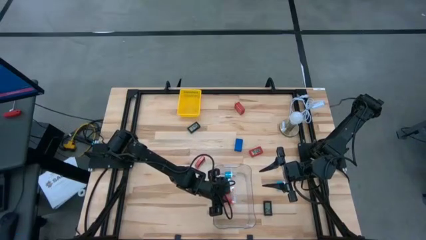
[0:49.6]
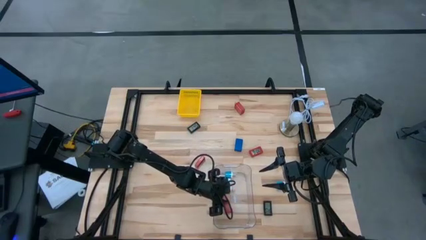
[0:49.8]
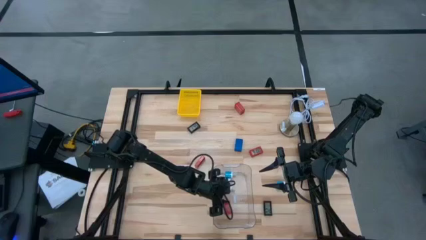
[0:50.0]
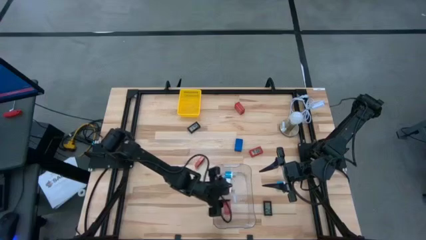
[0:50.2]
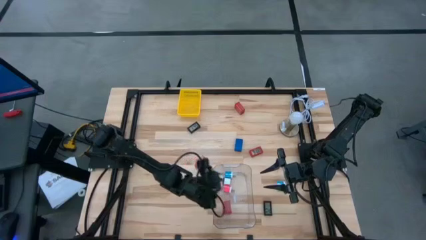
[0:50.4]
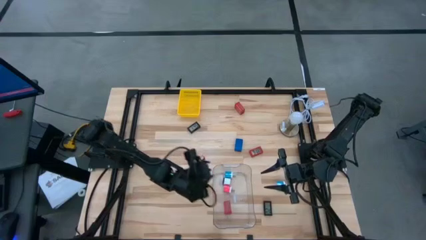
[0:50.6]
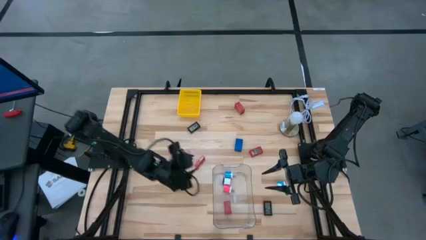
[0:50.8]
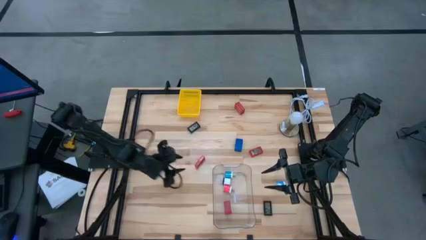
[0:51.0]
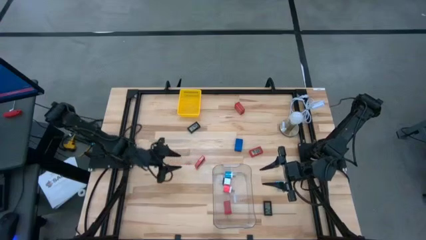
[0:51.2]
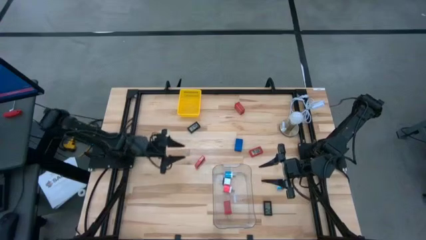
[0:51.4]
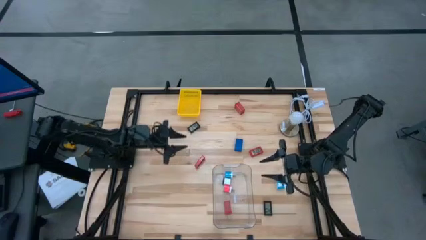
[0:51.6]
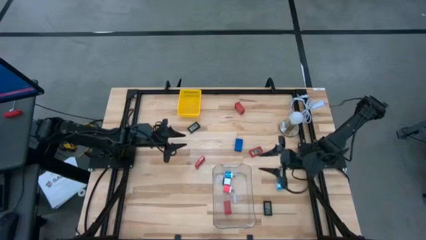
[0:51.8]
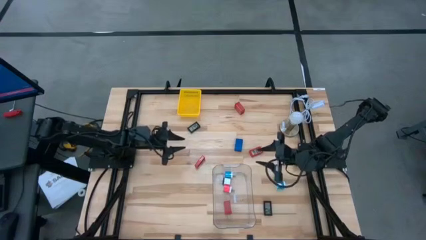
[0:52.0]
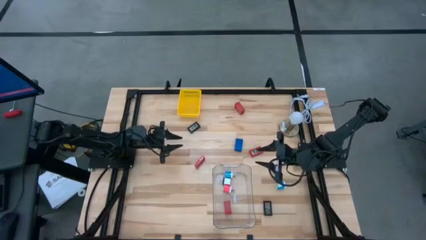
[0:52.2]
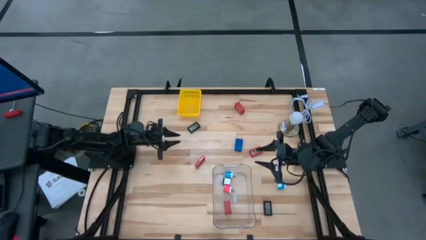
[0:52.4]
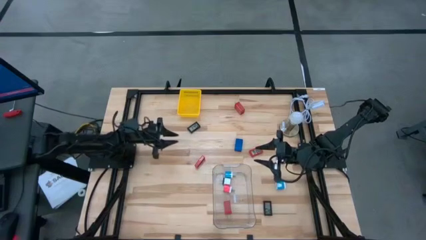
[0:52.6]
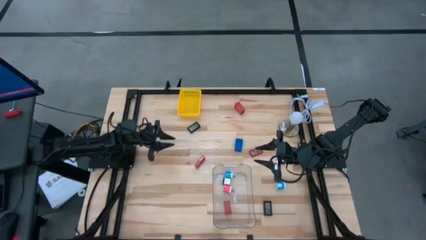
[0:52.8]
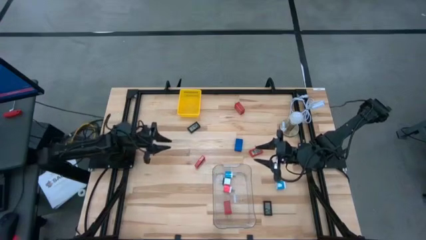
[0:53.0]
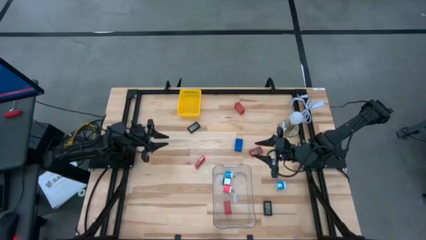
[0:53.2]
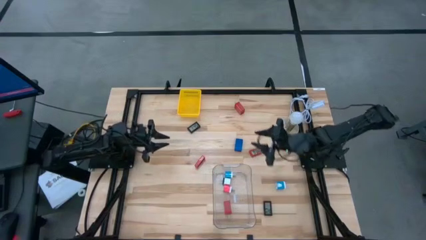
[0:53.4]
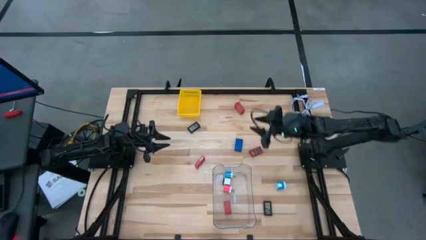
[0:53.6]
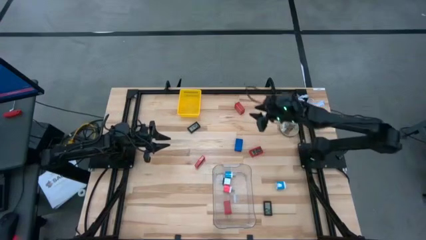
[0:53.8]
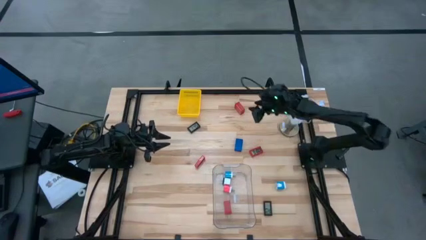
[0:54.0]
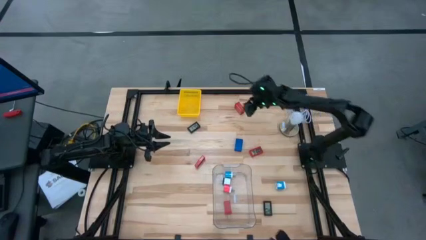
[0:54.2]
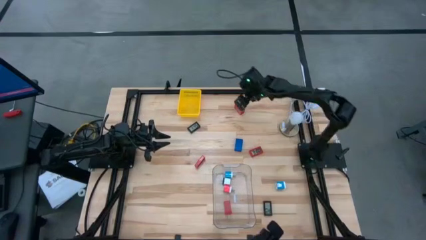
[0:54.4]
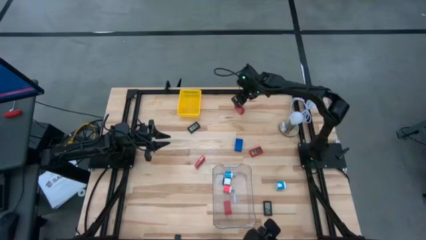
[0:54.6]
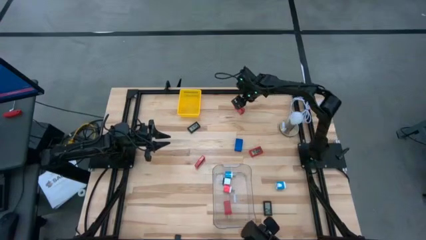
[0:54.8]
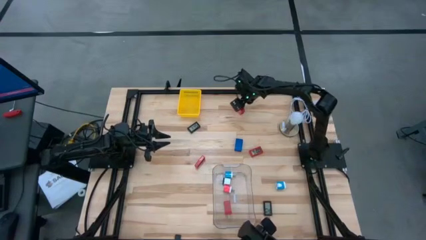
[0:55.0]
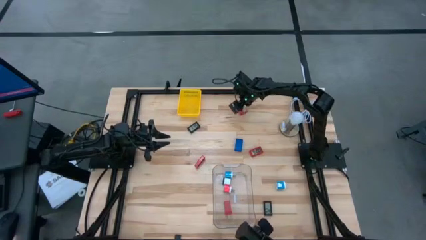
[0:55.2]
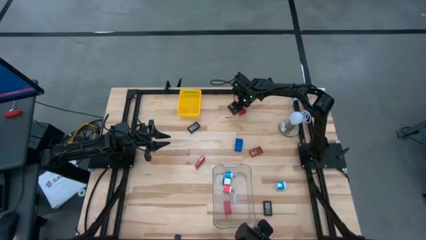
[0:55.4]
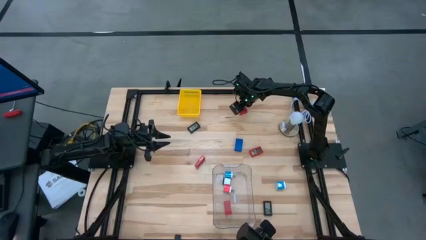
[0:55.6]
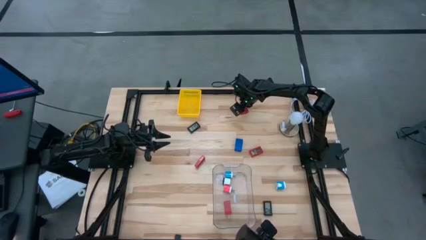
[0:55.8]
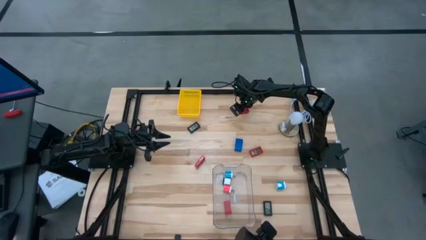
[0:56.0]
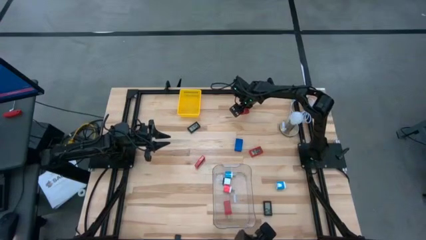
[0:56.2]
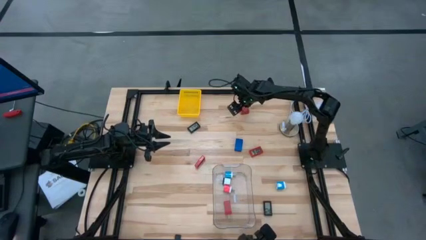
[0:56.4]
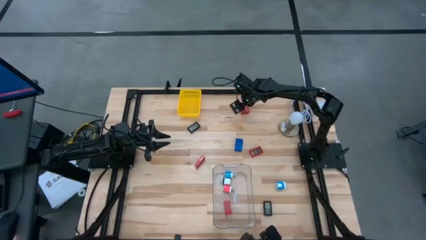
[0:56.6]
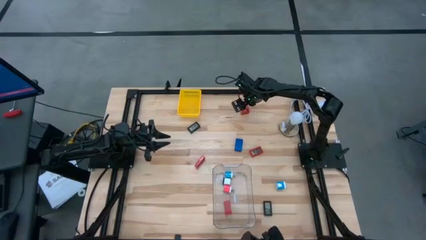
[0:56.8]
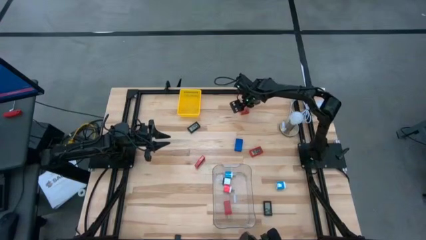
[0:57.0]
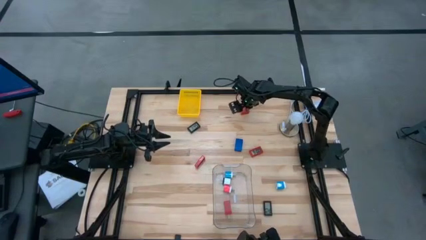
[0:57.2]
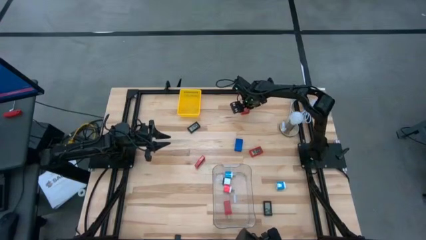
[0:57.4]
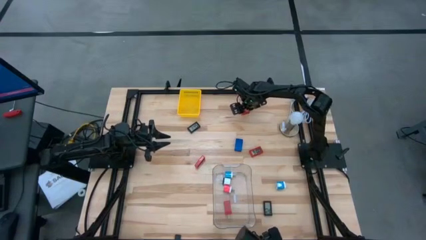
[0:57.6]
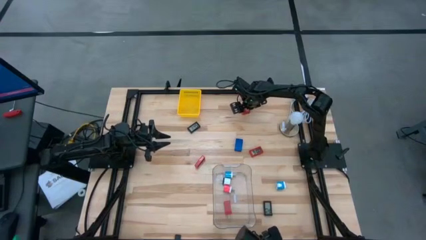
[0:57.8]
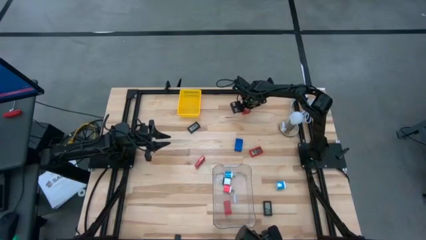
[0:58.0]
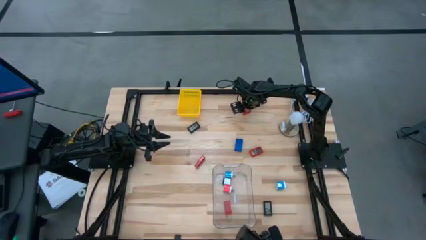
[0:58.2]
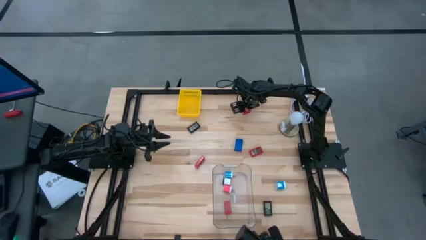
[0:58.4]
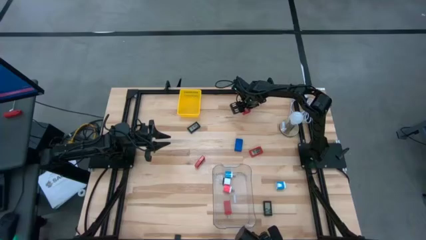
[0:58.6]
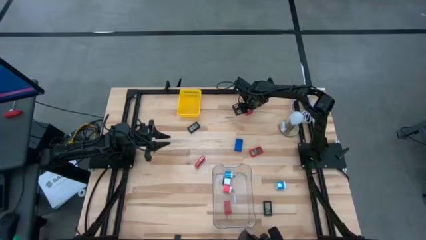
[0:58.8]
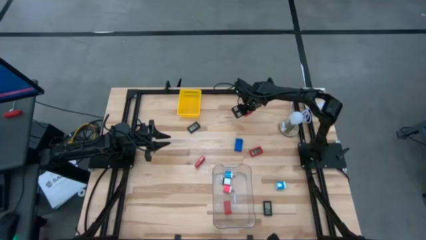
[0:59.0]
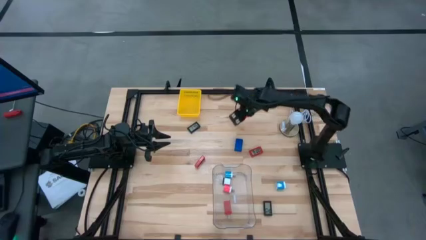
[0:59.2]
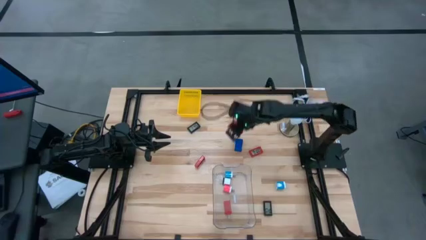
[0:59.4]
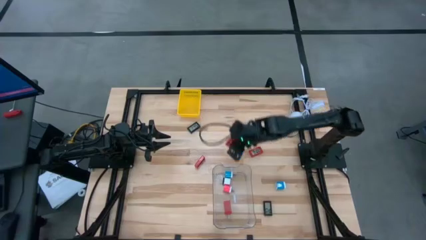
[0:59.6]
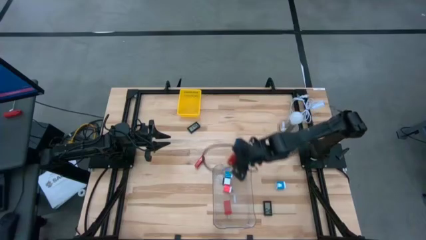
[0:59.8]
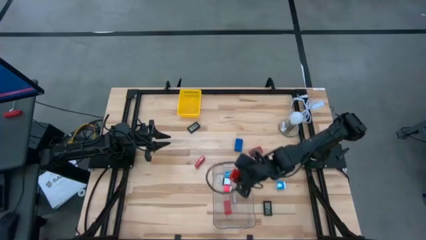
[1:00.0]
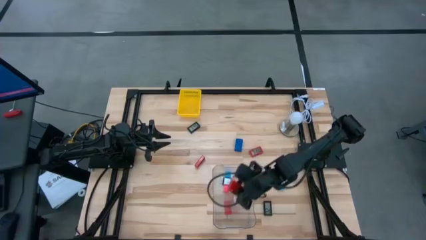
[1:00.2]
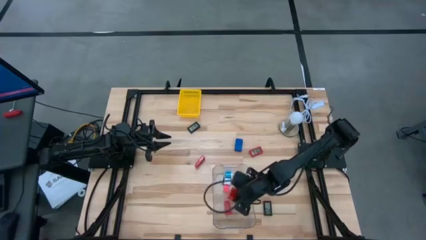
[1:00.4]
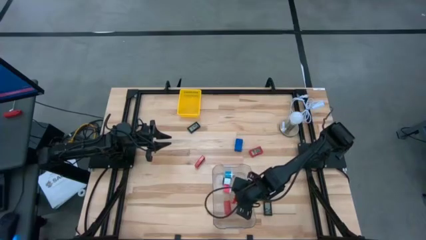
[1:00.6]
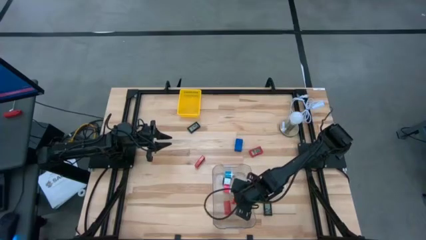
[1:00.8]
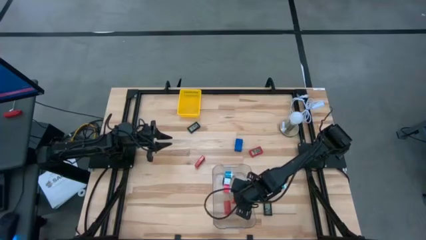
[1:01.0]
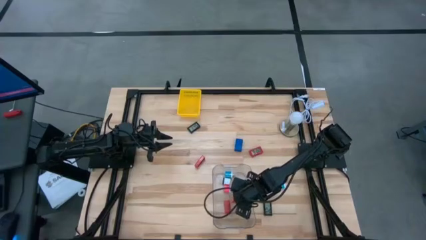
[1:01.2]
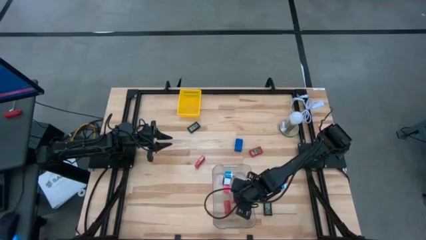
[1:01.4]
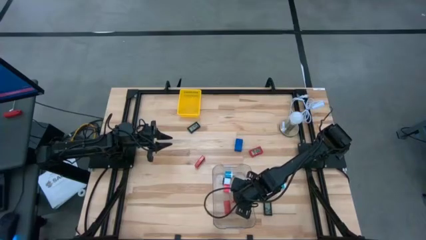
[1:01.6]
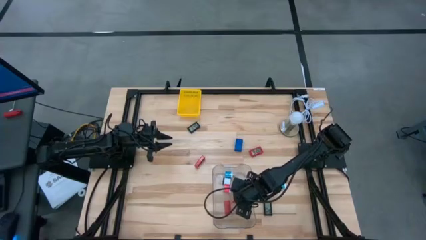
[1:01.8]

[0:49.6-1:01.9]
Task: Pick & Place Office items
Put the red power adaptor into the clear bin
